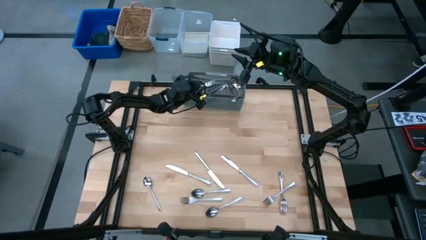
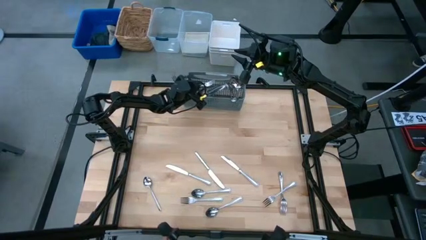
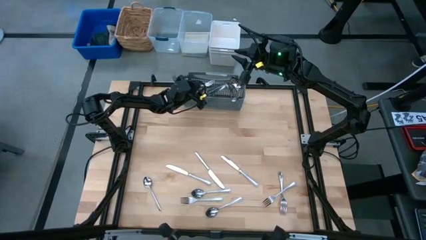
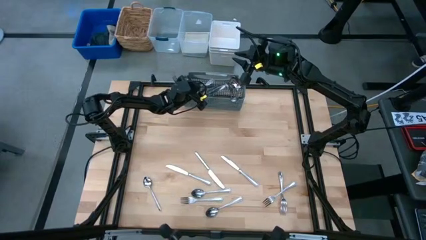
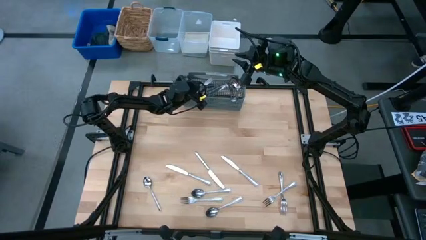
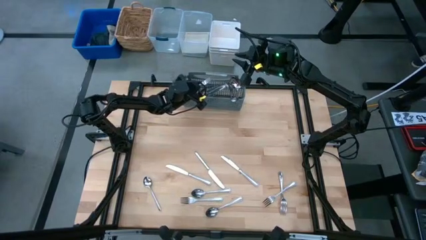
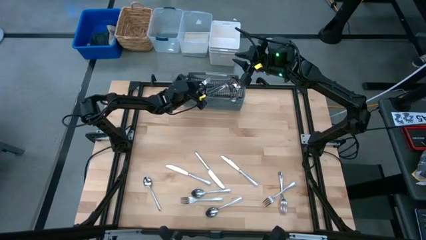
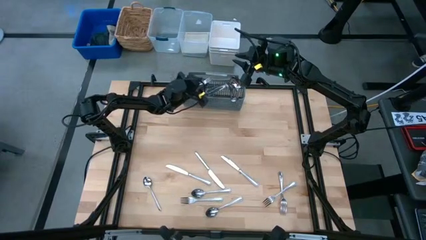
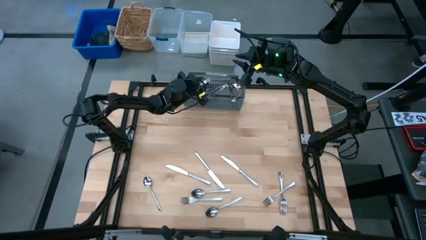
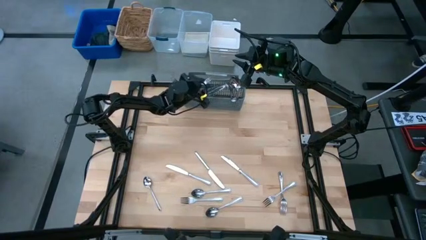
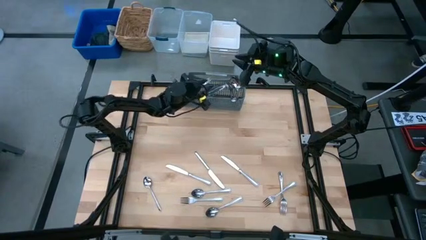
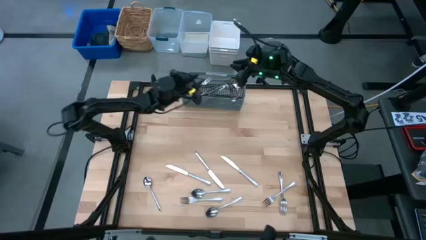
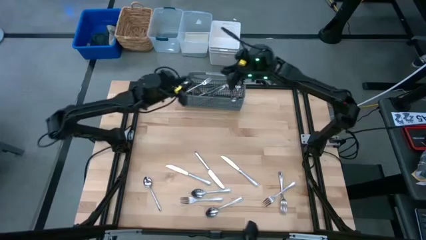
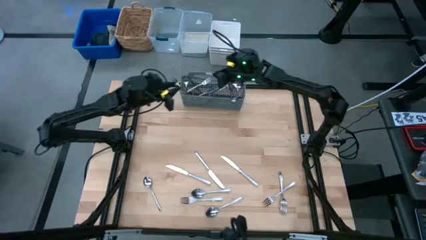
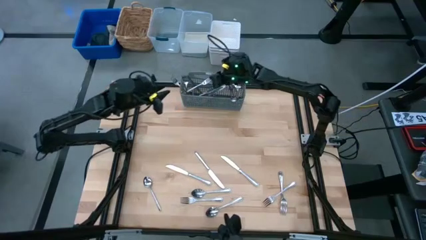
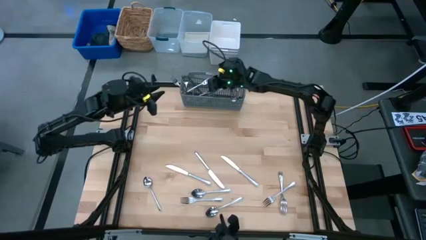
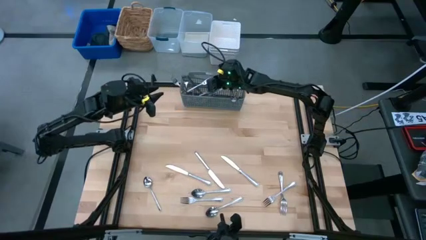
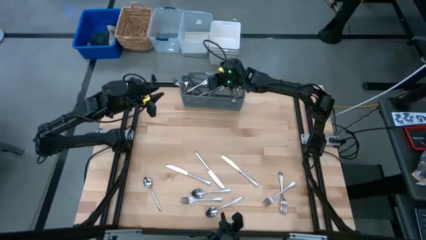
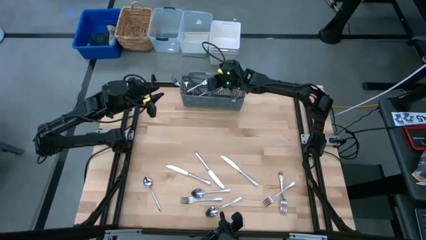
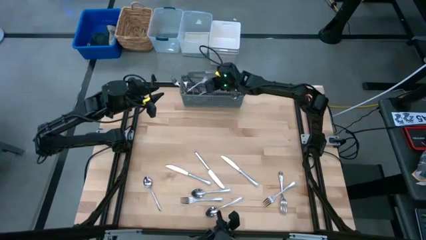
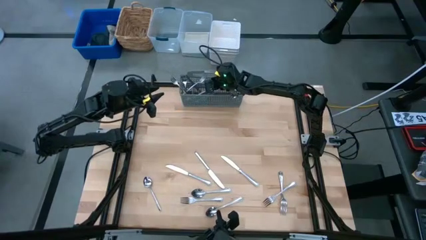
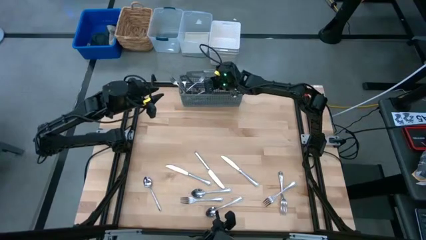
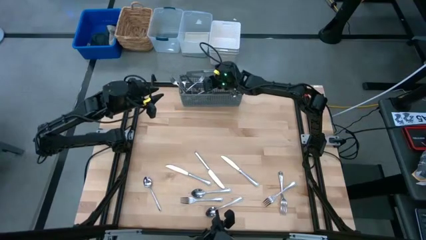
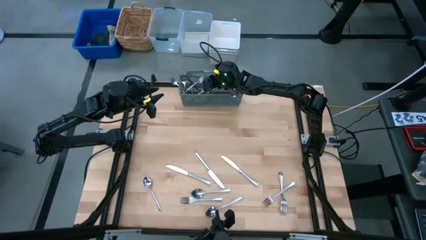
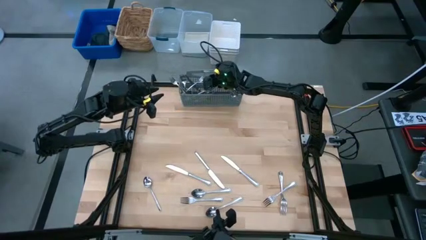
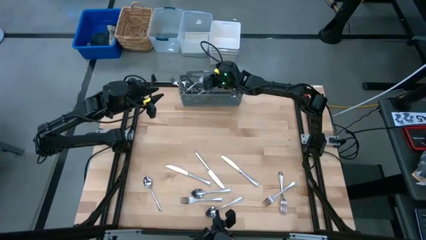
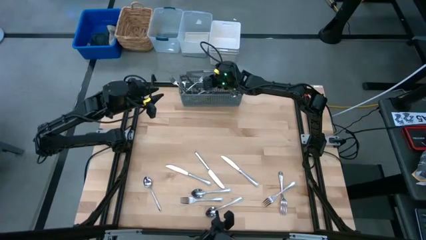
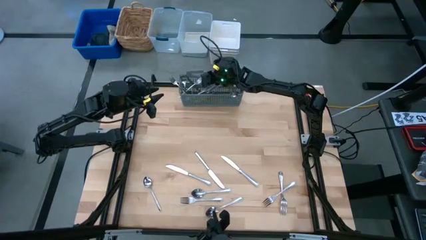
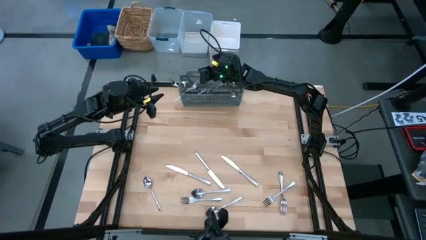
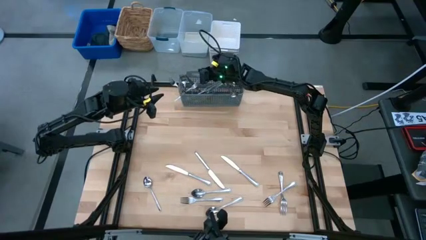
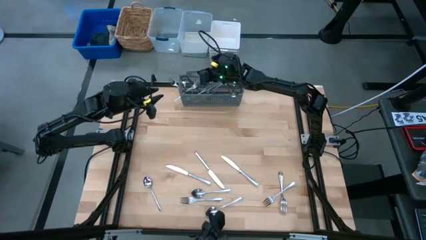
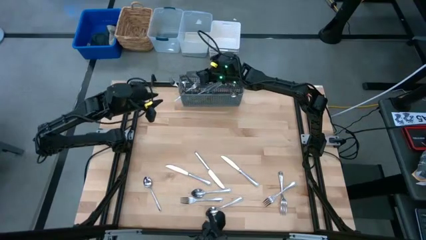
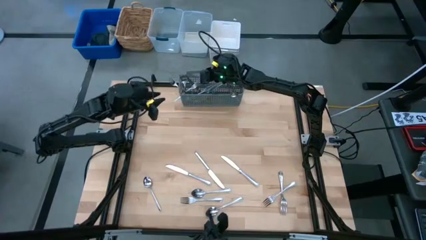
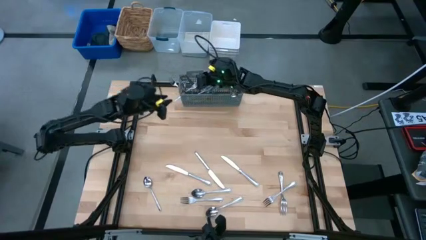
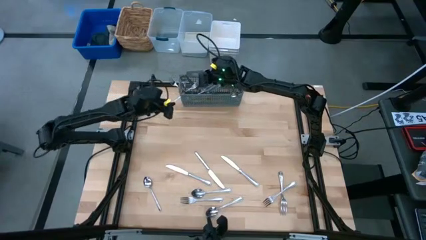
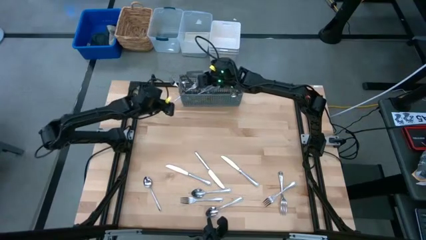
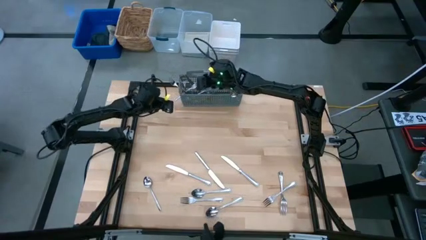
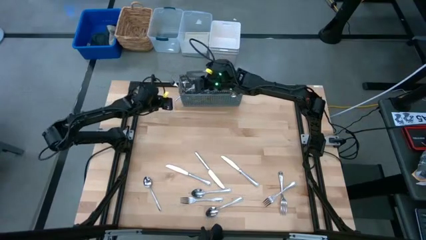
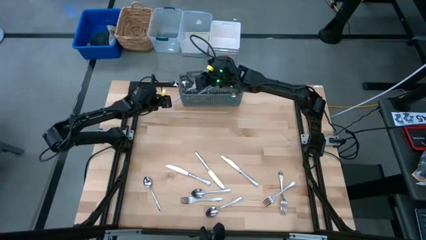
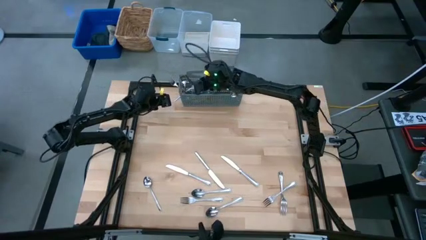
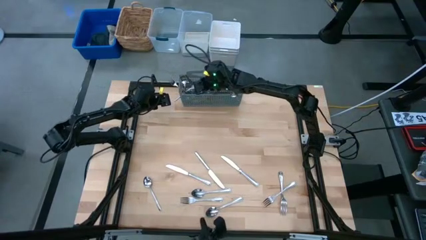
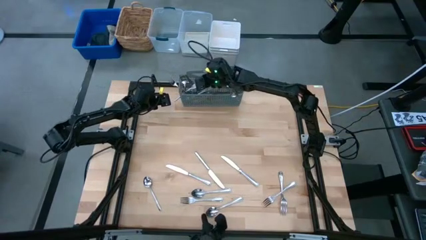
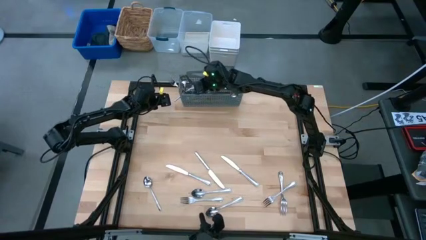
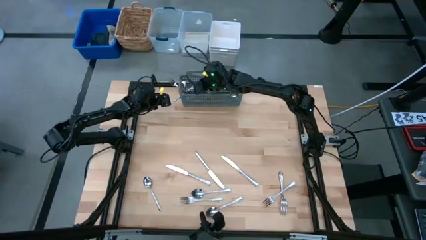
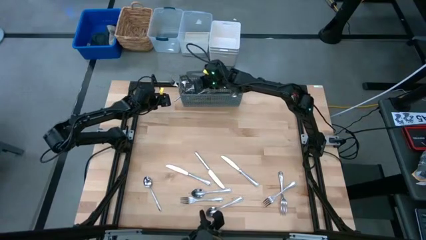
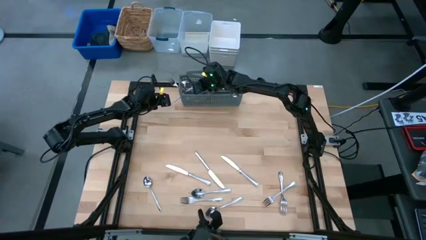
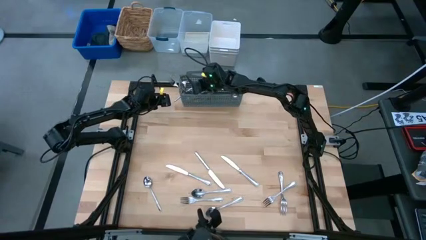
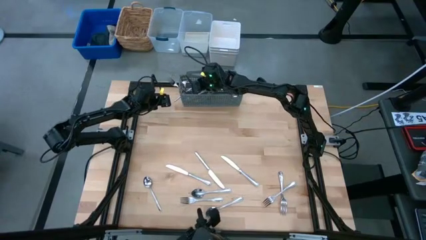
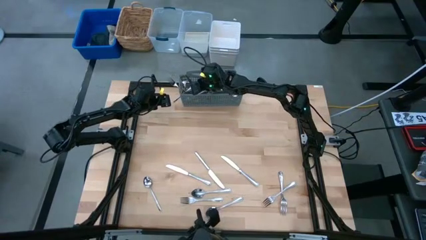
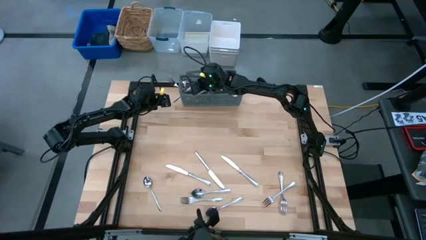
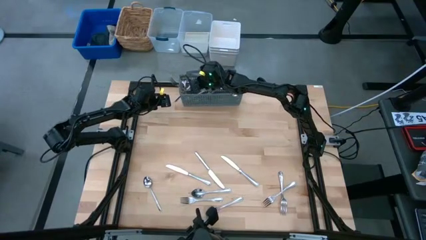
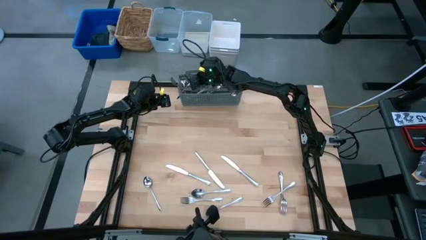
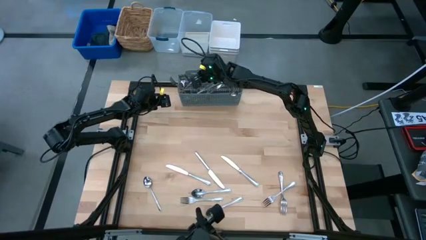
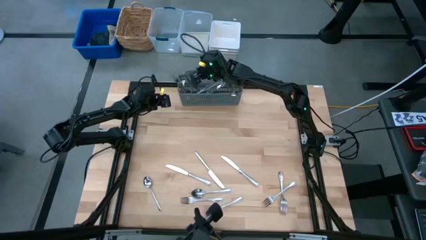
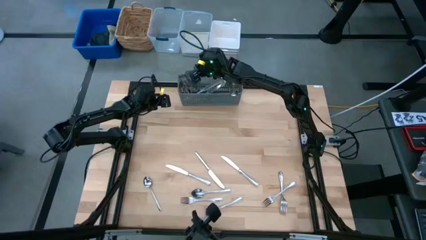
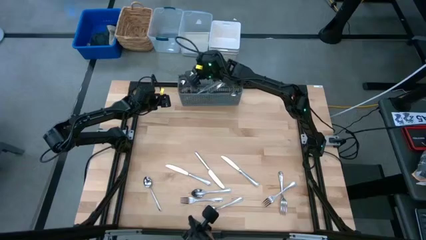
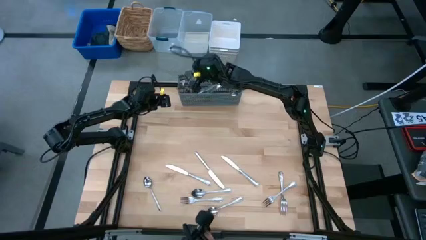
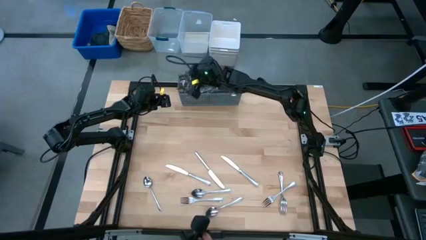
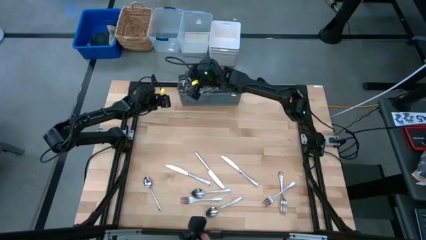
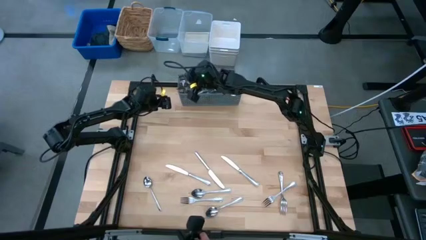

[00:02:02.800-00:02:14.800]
Adjust the silver fork in the dishwasher utensil holder

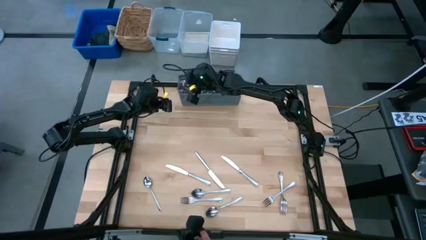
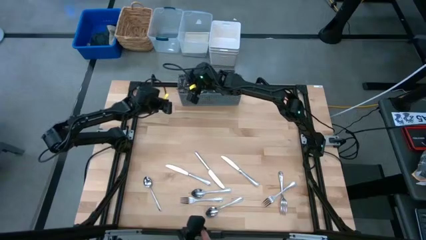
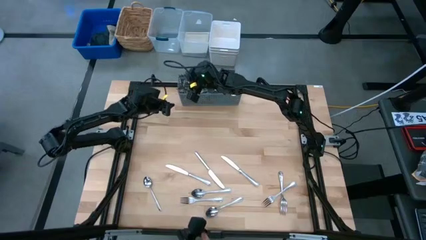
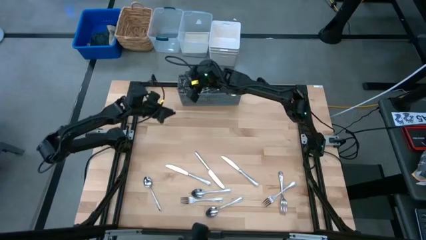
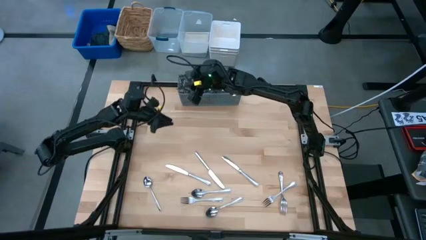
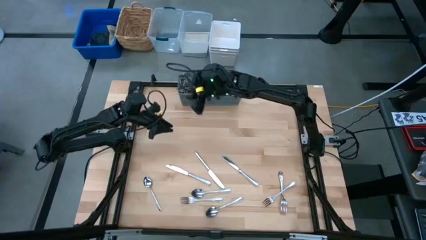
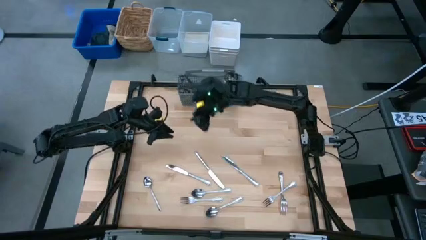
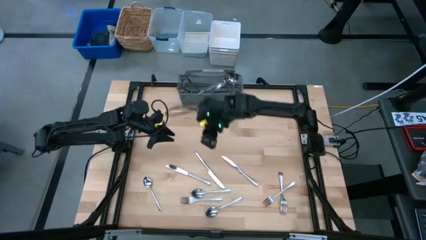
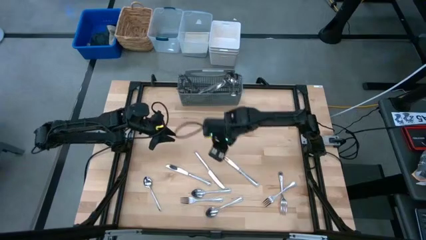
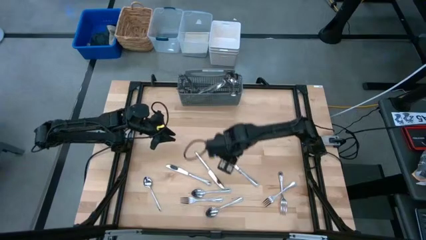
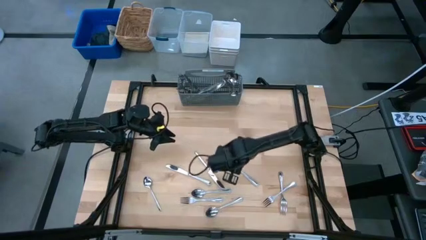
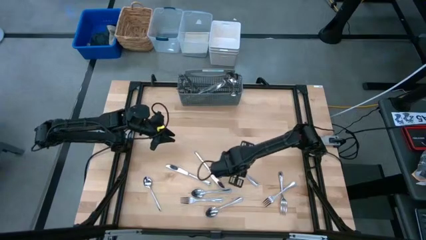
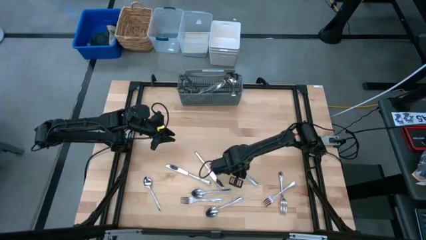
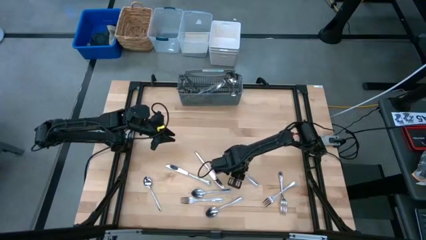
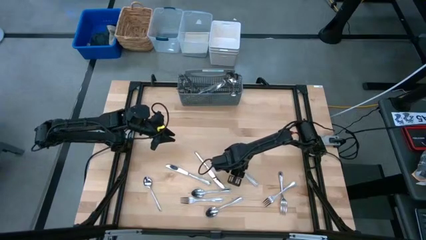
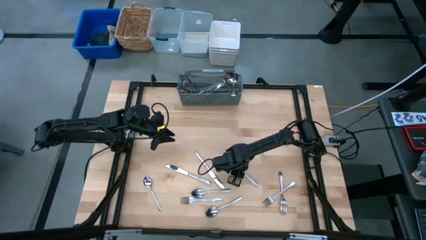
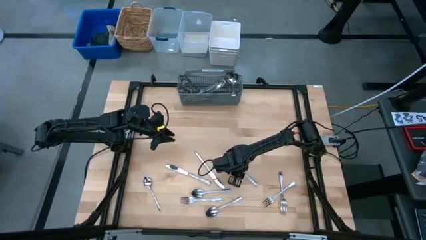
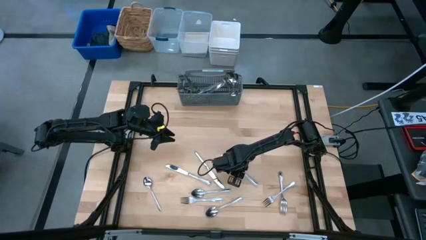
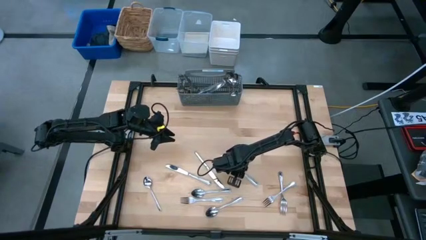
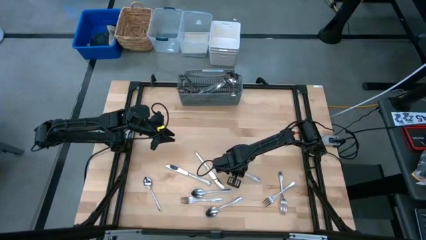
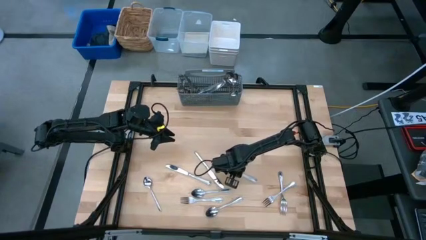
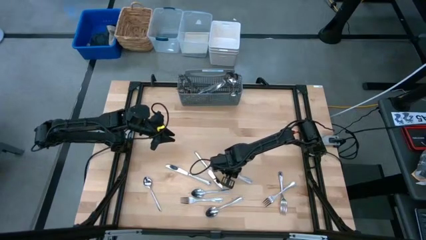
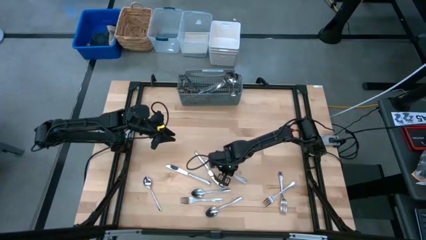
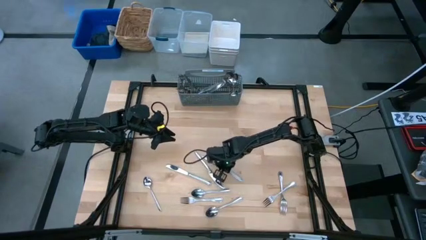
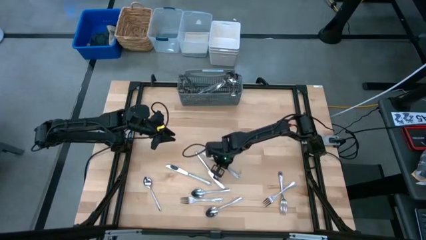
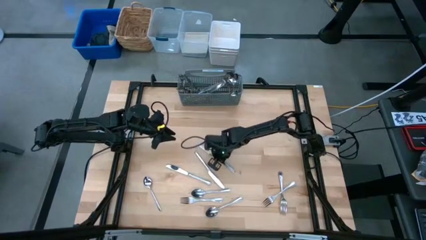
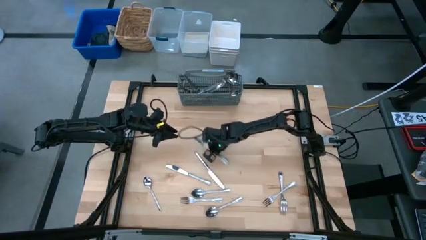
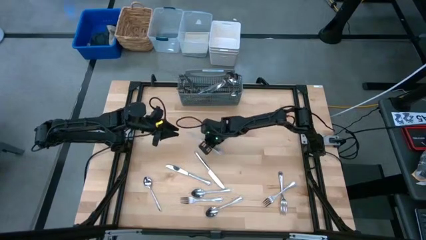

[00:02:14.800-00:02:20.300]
Put the silver knife into the dishwasher utensil holder
